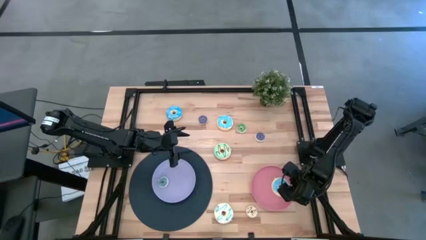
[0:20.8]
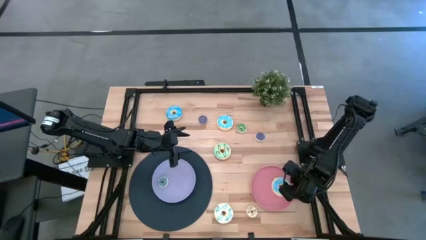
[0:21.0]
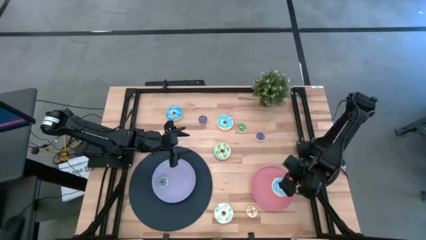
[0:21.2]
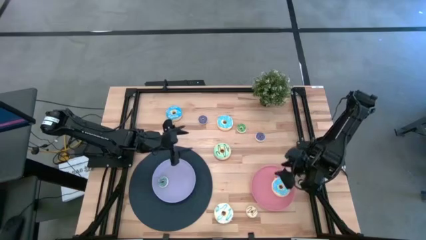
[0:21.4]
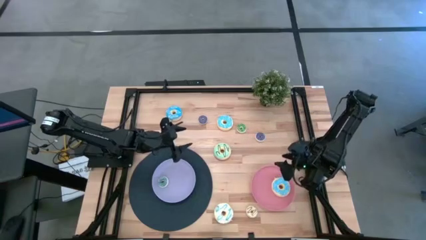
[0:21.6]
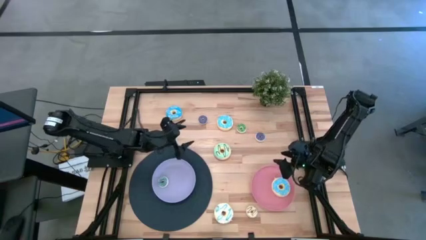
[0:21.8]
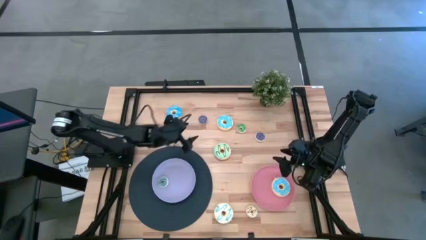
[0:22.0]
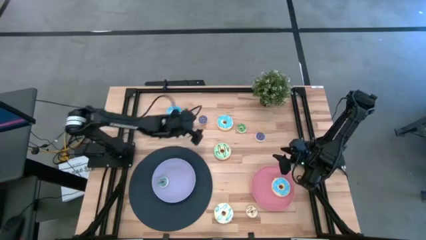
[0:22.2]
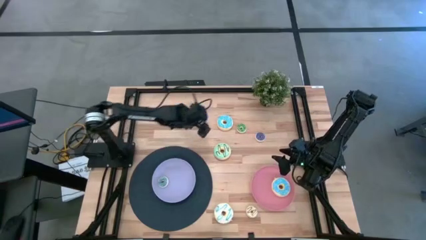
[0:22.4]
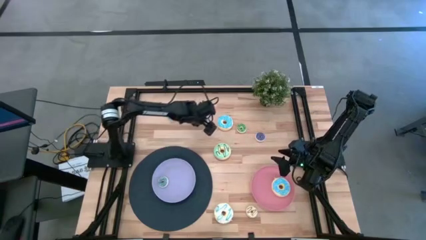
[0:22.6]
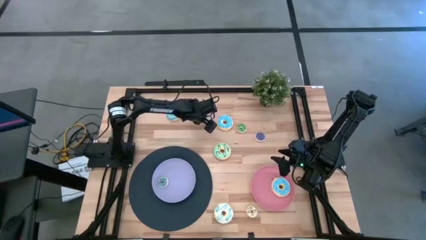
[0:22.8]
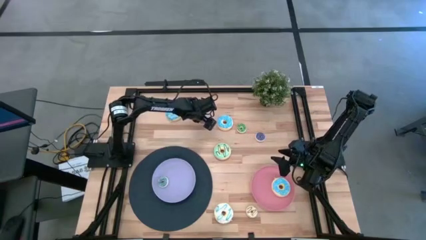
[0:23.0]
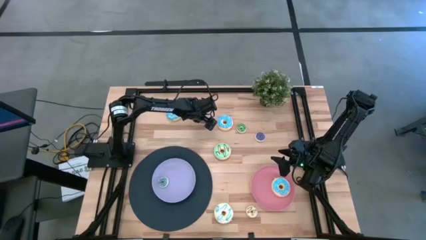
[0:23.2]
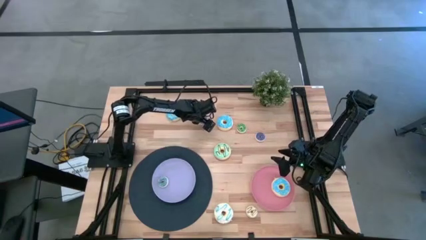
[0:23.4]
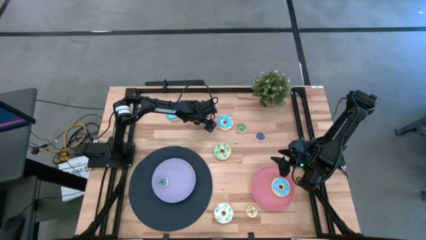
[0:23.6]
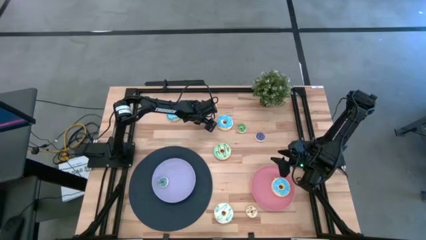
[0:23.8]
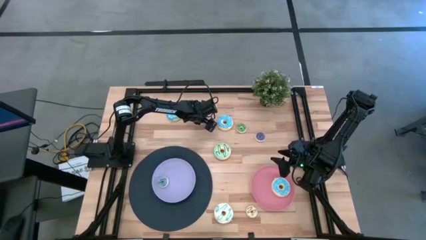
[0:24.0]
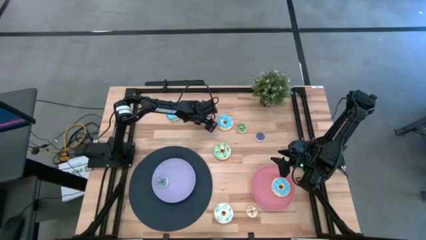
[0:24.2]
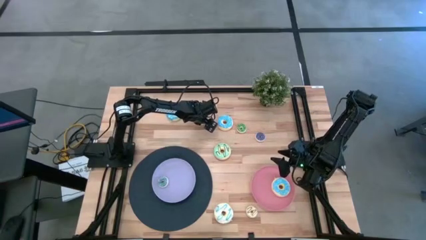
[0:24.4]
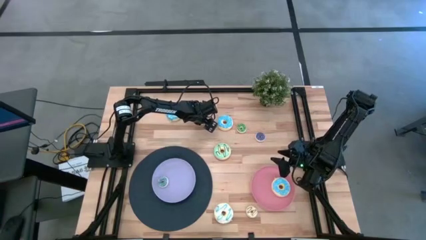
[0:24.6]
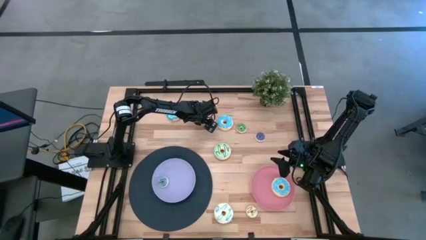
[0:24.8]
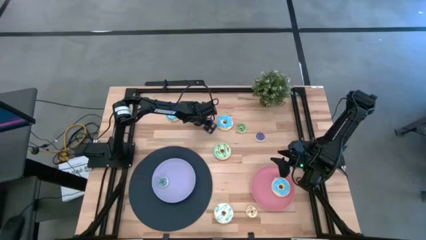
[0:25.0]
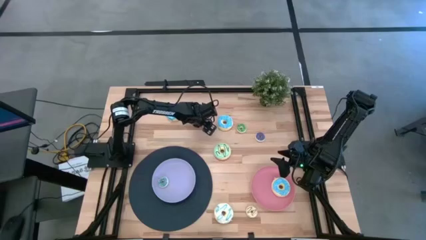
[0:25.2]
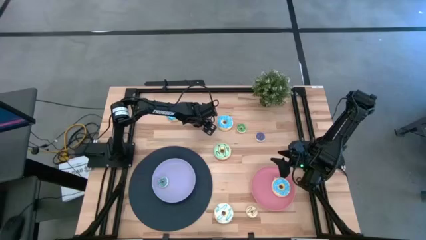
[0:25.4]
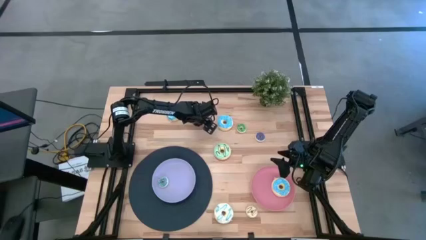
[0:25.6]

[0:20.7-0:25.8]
Task: Pick & Place donuts
Put the top small dark blue donut on the purple plate

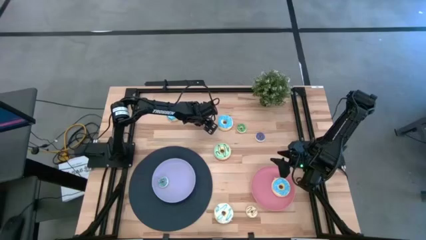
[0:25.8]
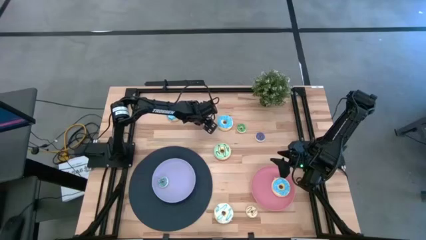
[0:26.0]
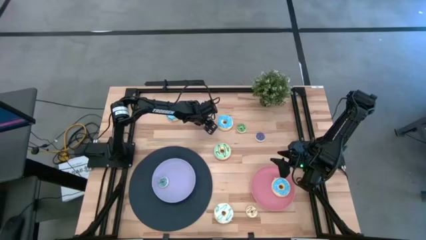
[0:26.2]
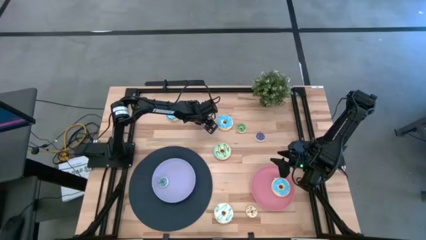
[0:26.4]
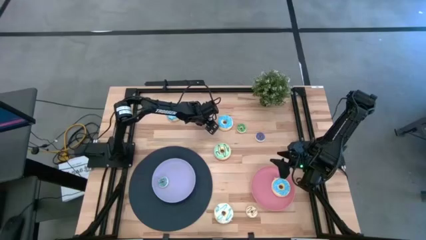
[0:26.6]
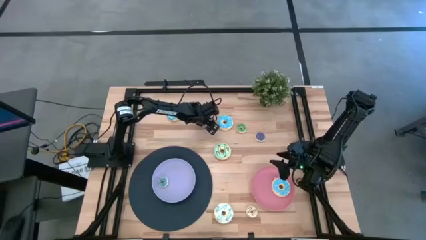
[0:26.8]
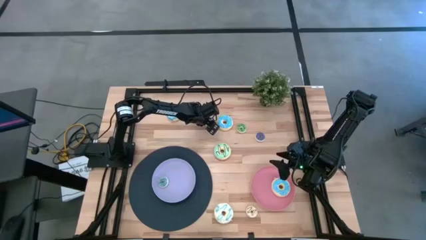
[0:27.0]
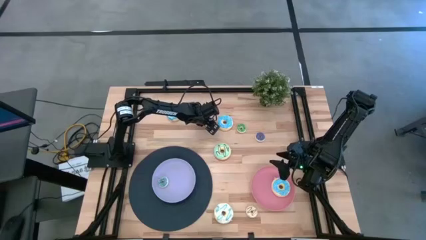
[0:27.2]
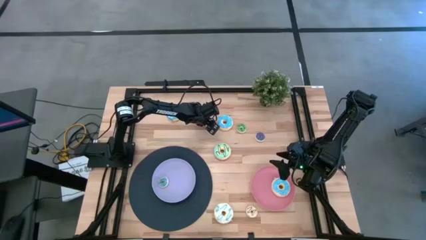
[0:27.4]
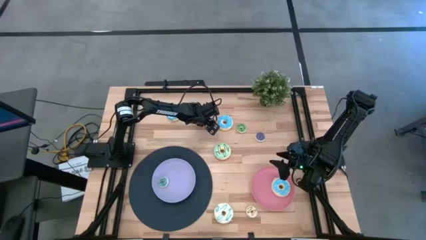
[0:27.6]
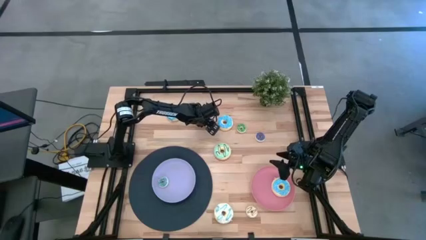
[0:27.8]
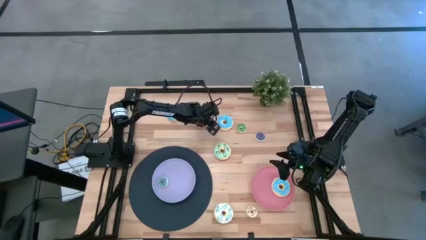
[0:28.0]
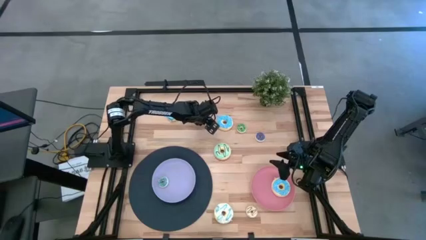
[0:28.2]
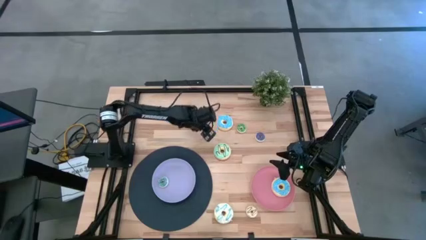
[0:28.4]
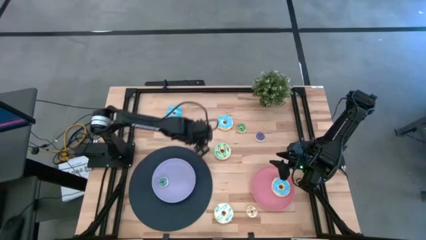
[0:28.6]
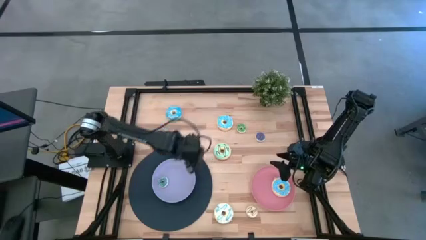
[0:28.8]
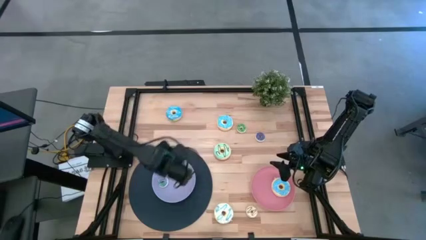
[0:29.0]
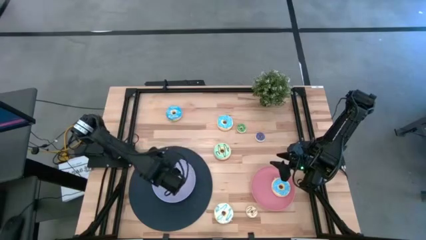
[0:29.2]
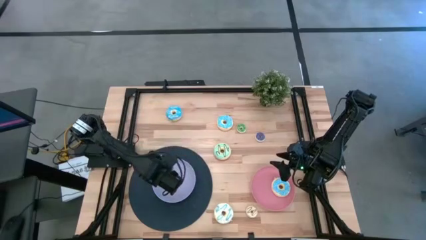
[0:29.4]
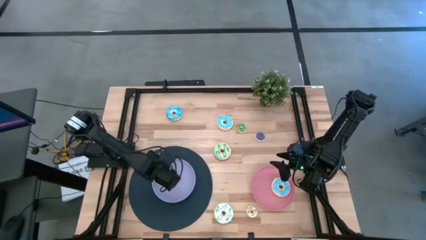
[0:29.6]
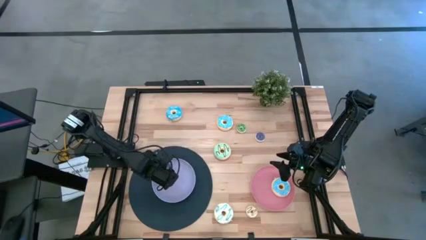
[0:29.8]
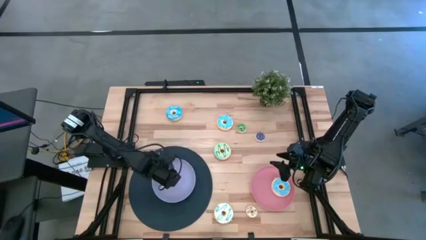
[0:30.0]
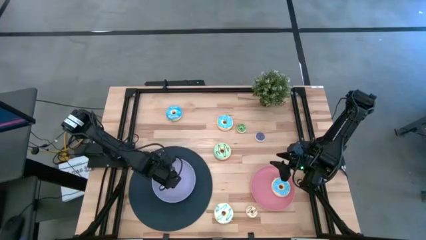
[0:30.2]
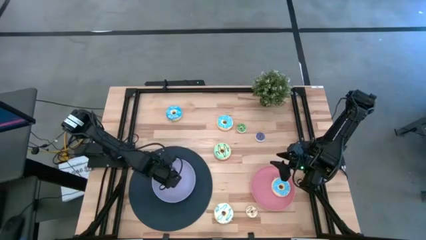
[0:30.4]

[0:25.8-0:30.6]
Put the top small dark blue donut on the purple plate

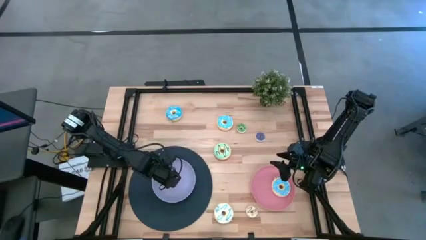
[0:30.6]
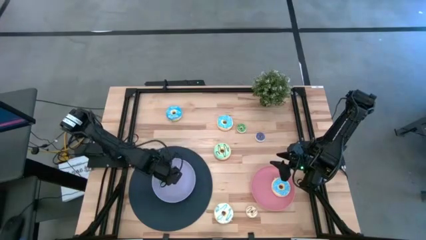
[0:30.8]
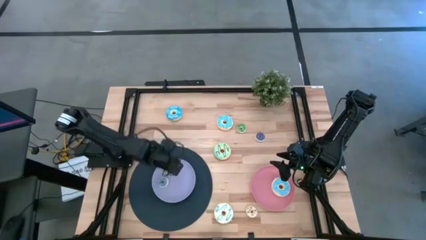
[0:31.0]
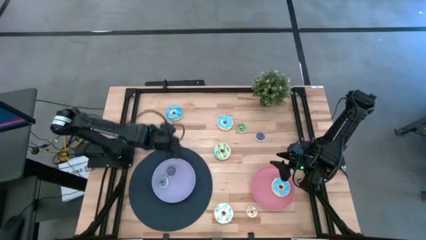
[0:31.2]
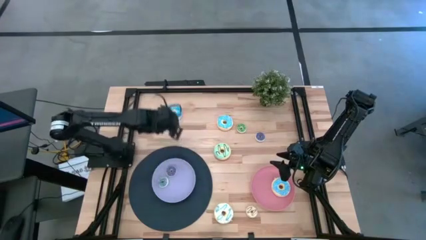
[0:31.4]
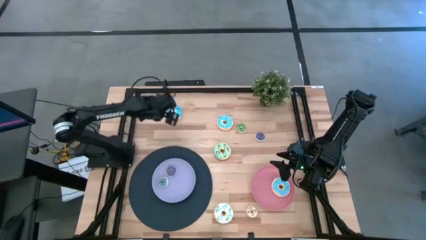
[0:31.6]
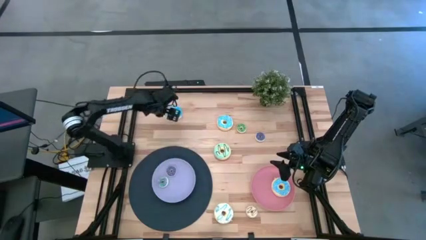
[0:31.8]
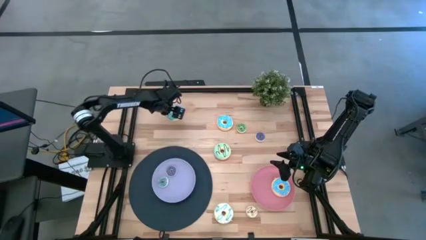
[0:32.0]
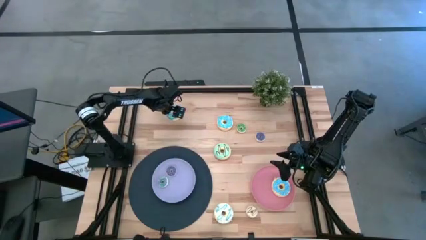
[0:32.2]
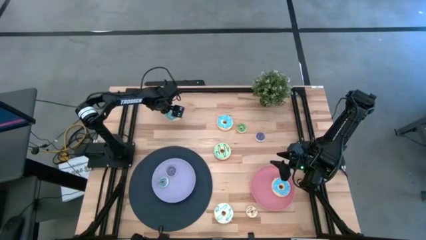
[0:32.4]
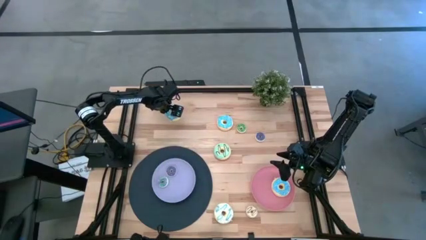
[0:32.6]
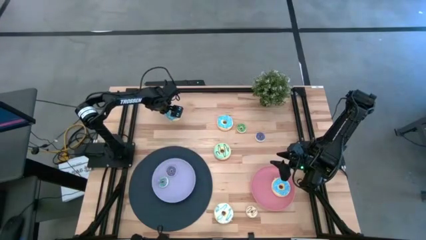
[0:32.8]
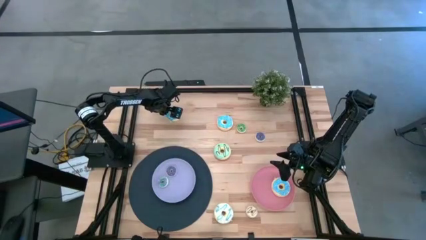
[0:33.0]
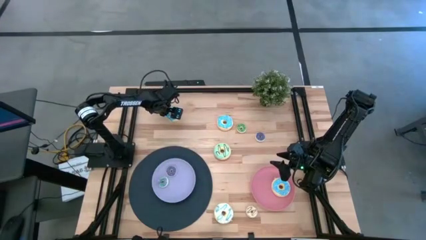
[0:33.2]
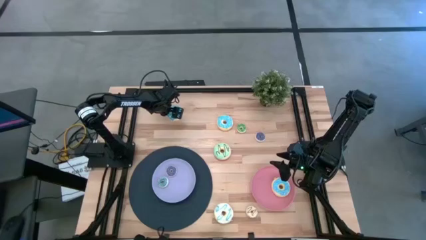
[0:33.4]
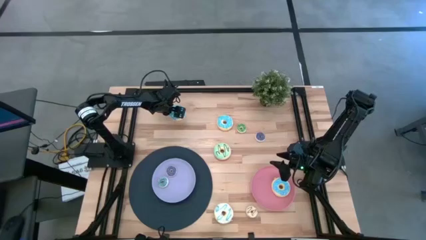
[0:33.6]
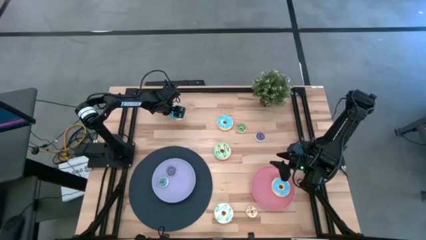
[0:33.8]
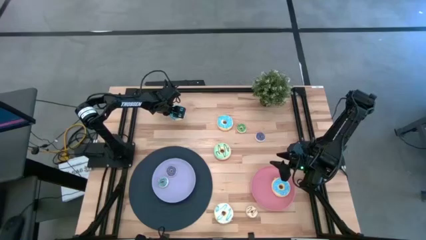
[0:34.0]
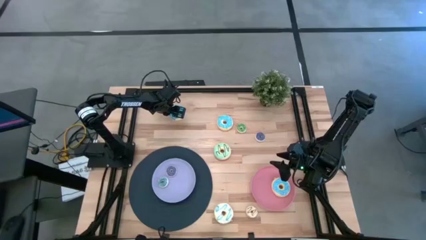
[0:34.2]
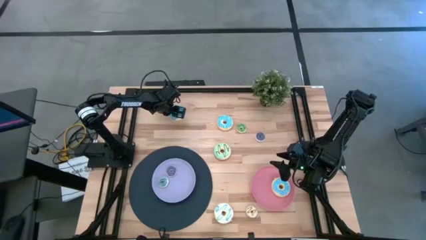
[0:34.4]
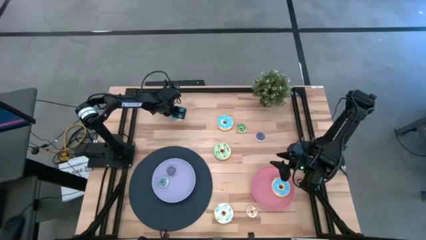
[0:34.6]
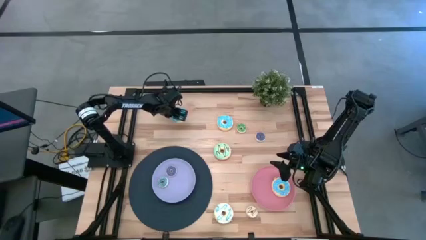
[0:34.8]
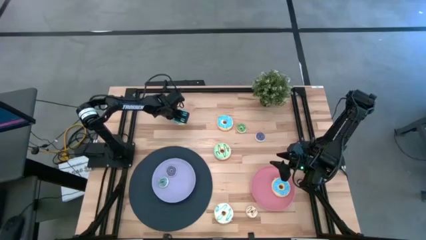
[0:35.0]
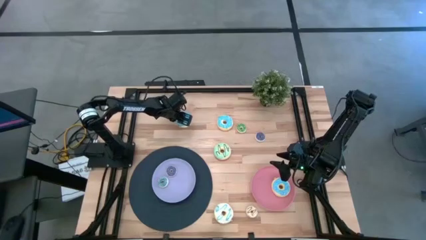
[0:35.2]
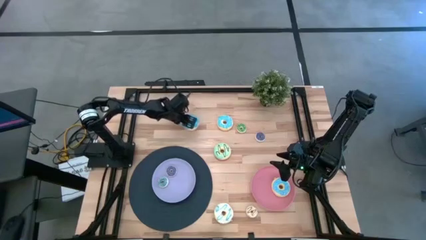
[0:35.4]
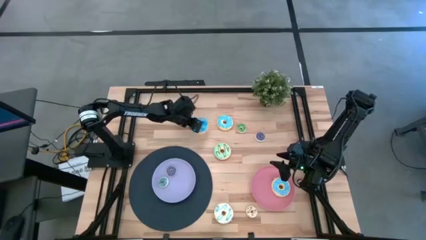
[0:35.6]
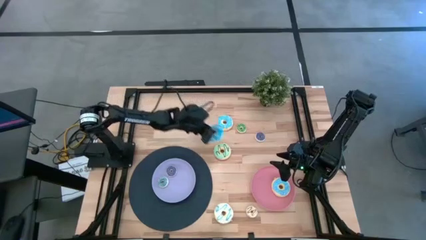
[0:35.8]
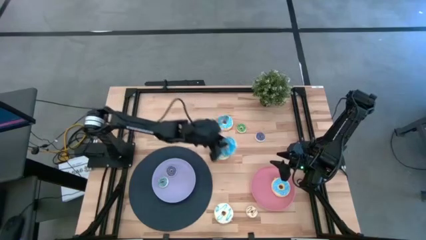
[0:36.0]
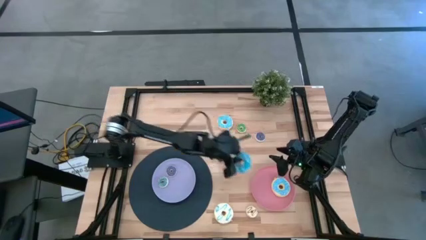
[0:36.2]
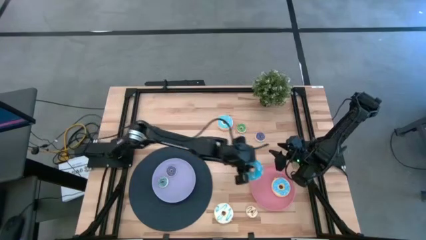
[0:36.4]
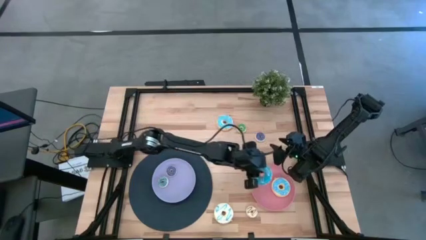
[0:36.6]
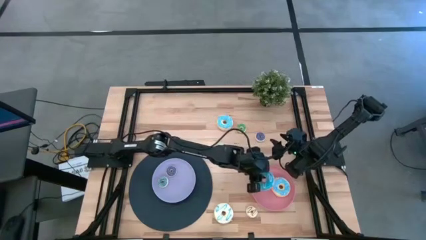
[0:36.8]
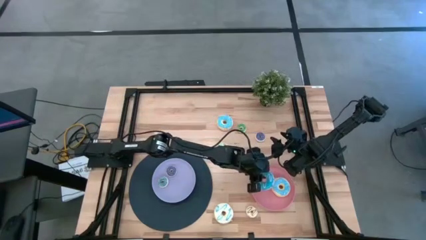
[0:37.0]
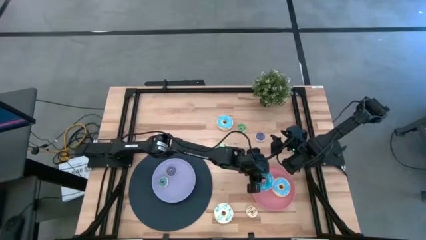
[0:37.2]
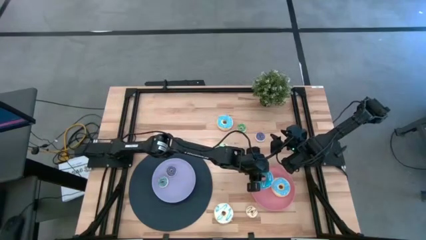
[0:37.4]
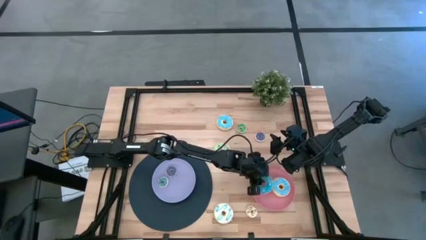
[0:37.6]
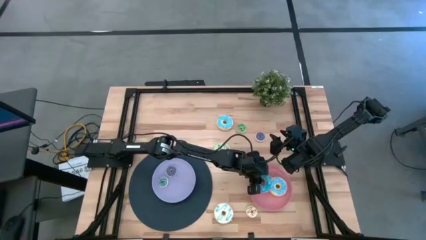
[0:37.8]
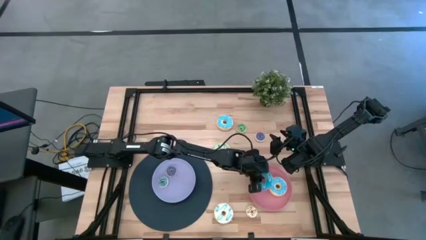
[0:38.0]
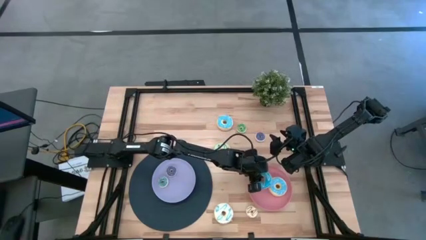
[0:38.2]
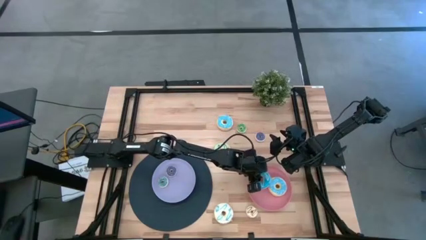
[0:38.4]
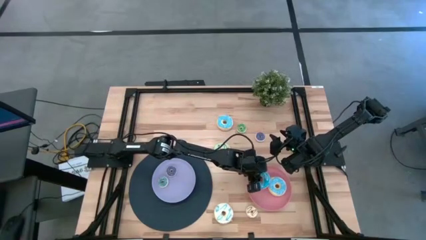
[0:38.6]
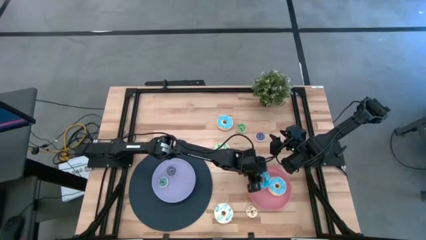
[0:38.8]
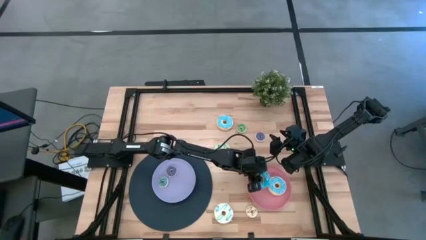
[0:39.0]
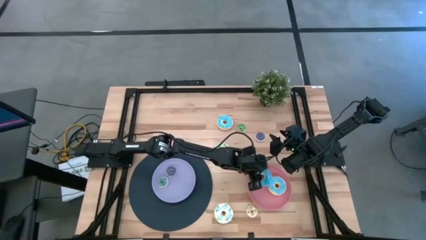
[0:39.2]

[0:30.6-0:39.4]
Put the left large blue donut on the pink plate
